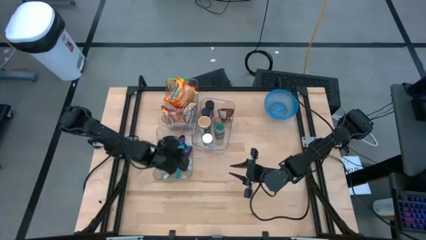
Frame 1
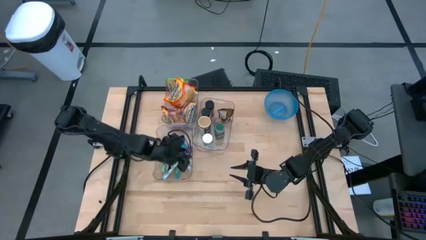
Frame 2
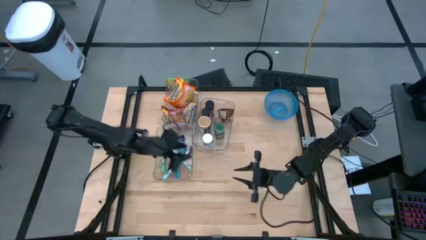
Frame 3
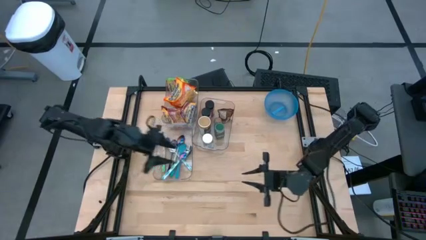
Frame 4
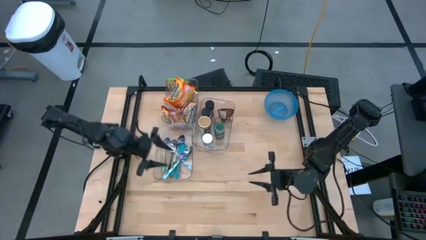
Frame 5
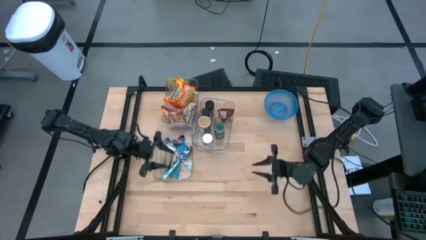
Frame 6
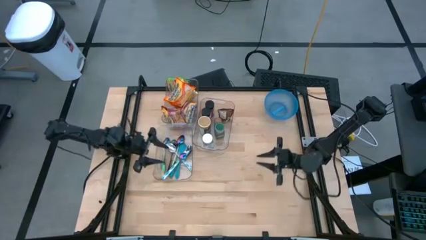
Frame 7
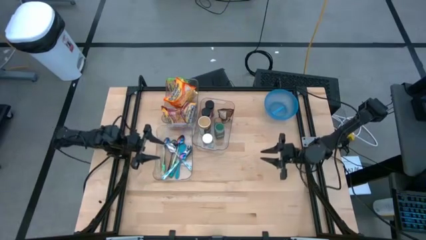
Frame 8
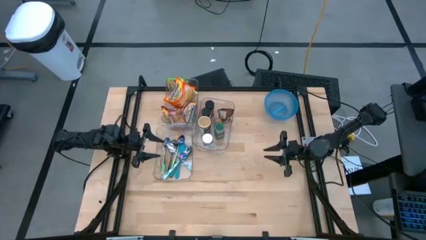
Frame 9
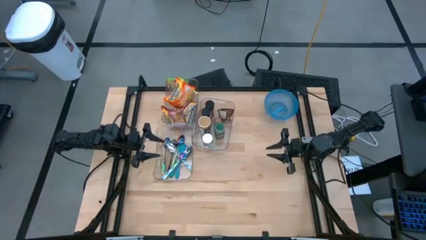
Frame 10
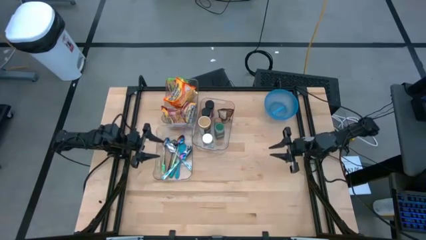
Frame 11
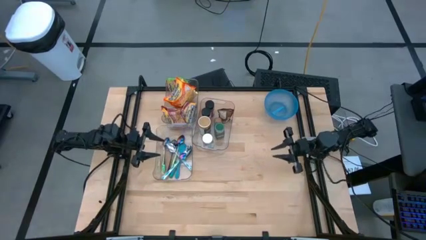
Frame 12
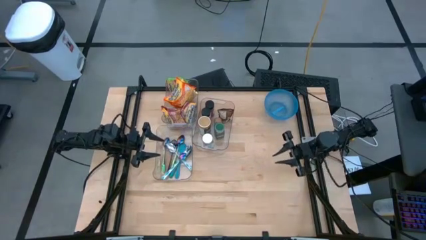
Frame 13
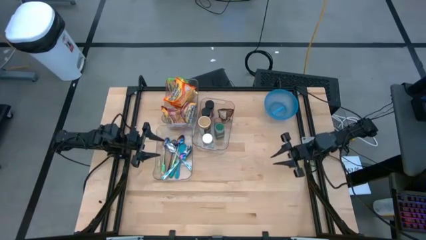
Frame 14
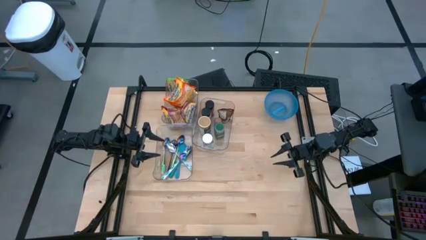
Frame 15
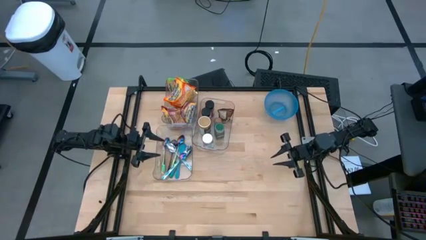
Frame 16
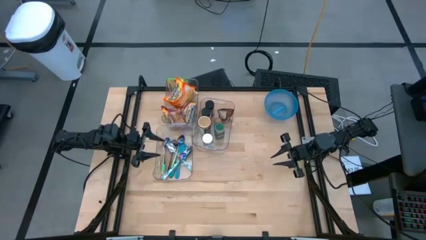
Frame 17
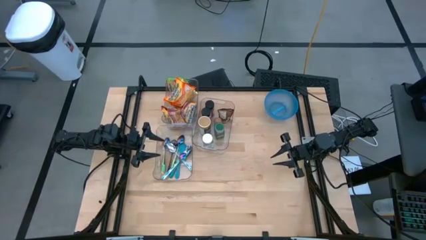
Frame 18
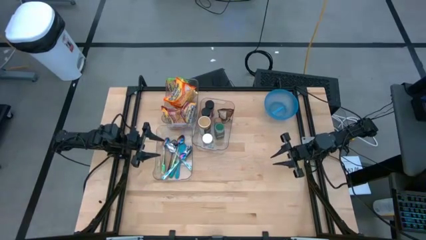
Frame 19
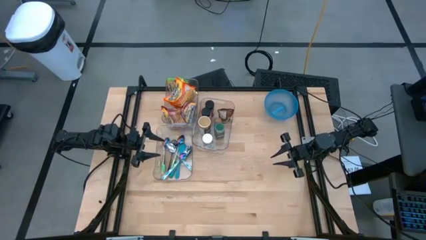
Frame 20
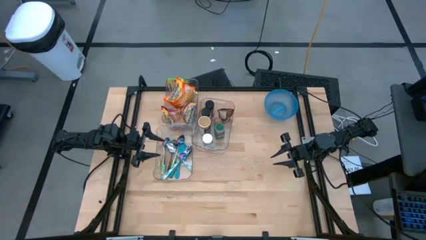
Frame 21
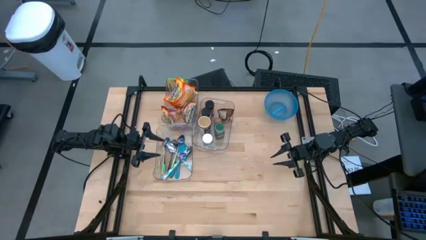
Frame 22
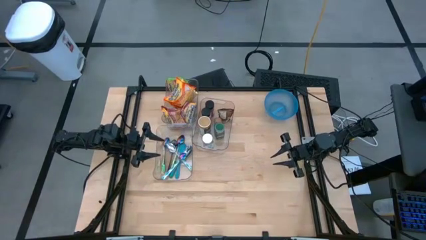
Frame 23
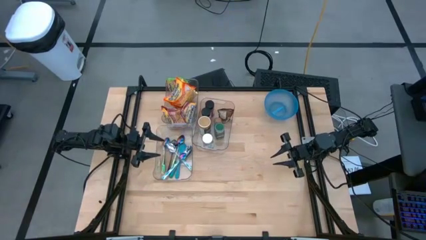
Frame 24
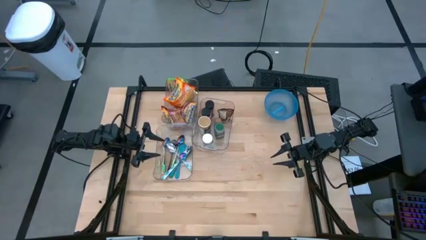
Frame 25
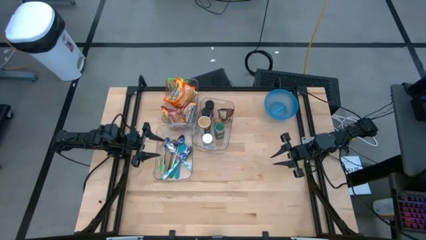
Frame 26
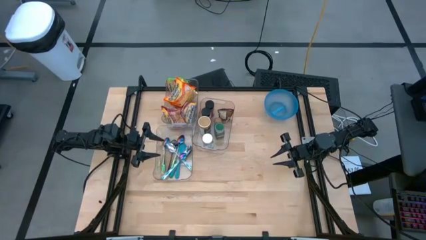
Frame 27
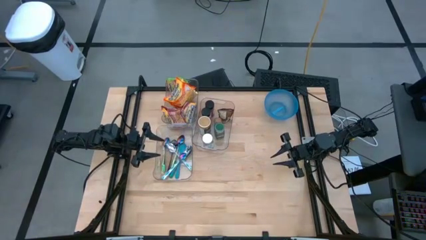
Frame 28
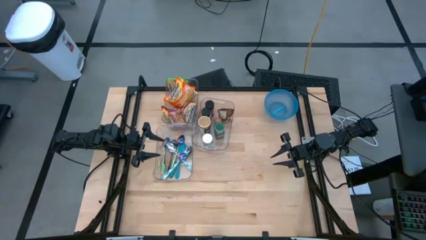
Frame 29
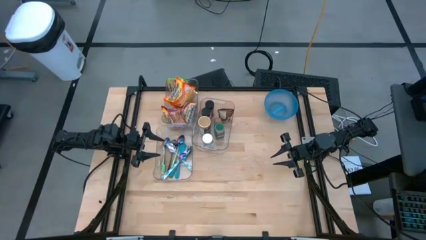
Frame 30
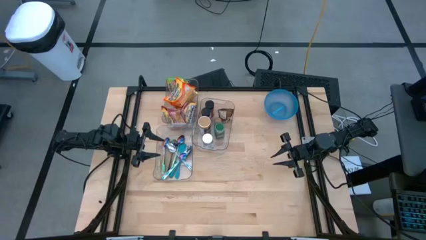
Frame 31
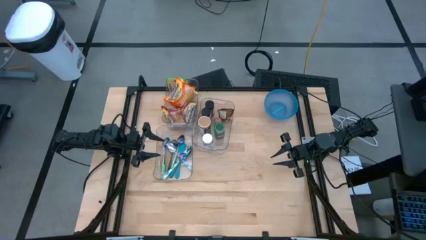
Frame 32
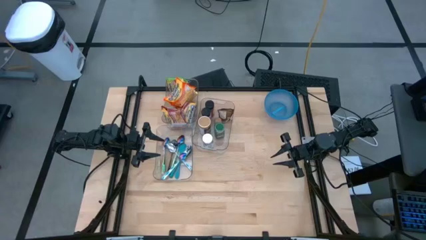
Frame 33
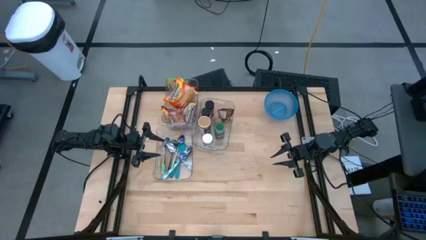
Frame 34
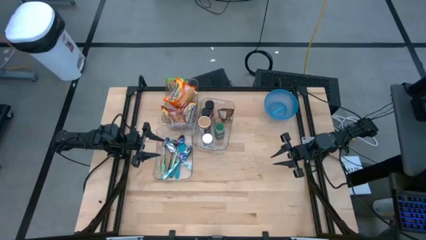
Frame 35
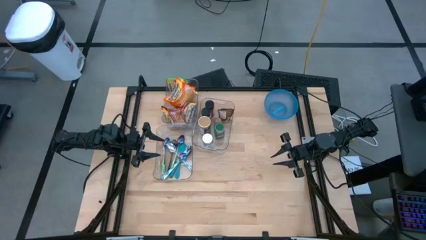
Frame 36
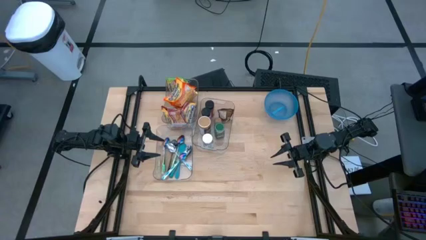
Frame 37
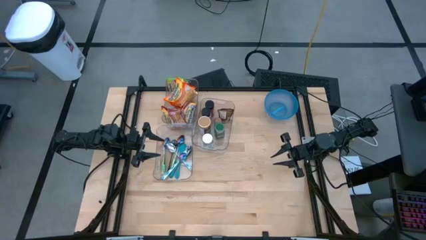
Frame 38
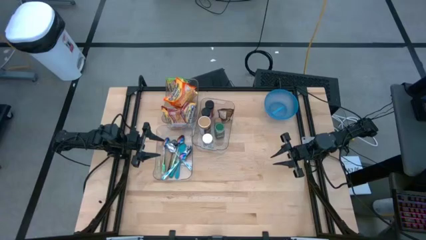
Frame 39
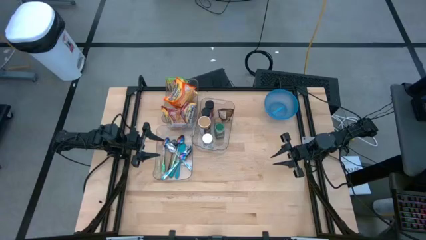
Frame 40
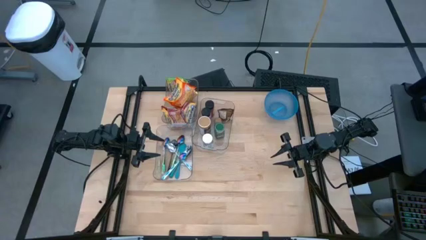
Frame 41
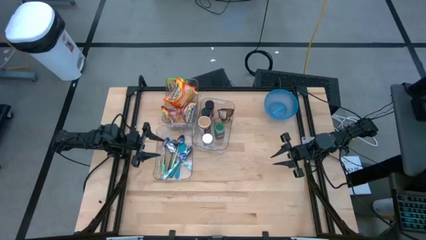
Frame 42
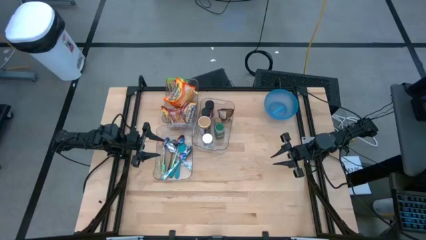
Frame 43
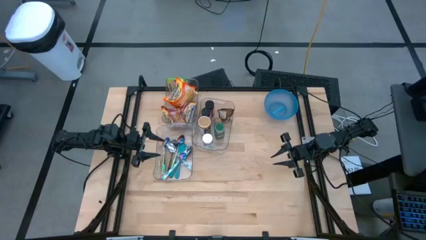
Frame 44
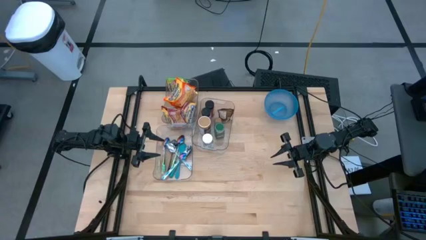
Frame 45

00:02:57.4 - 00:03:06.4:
Task: Pick & Place Food Item
Return to Home Position

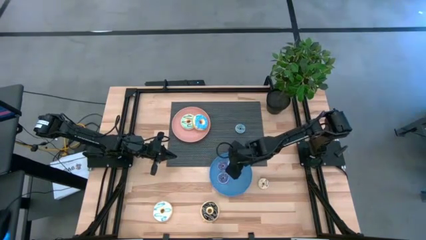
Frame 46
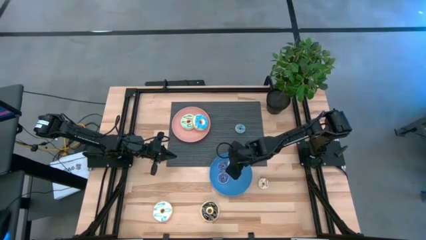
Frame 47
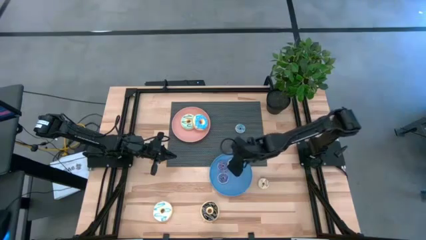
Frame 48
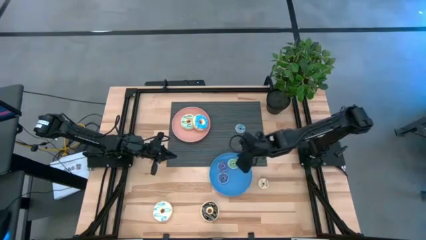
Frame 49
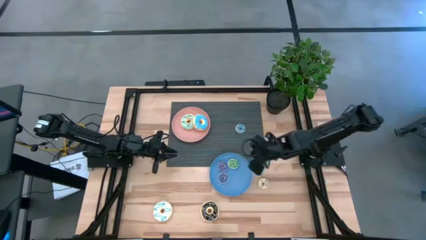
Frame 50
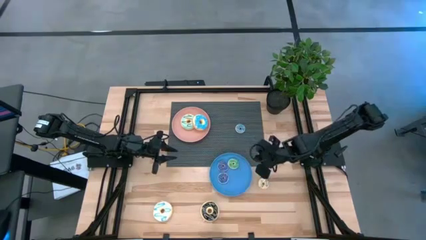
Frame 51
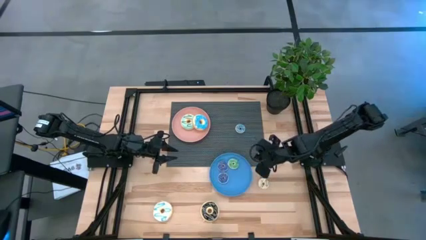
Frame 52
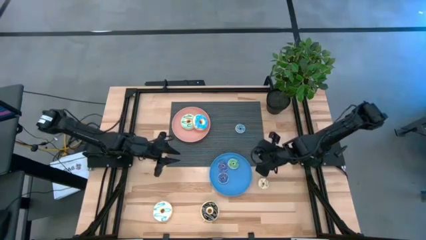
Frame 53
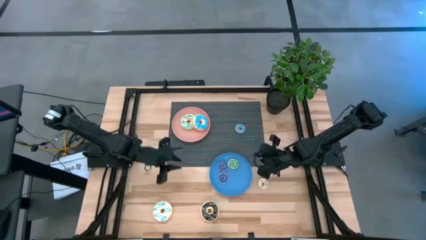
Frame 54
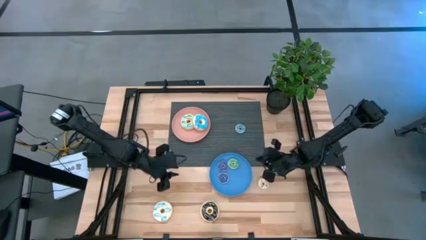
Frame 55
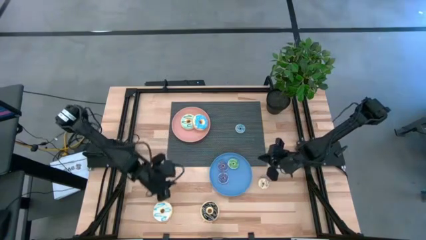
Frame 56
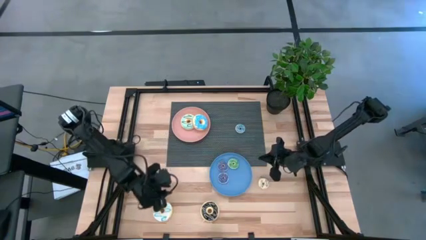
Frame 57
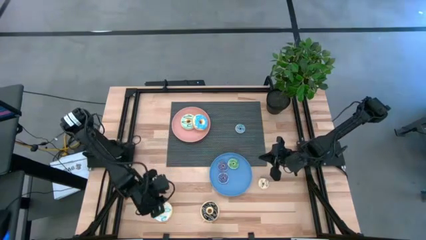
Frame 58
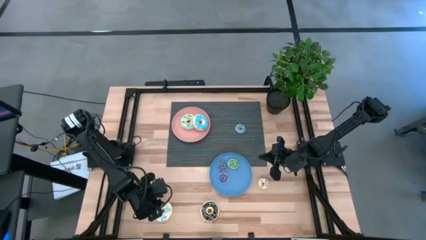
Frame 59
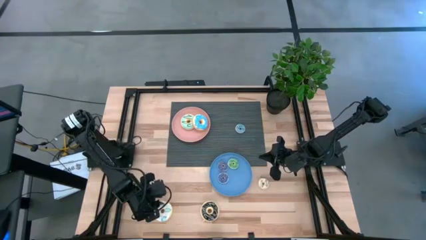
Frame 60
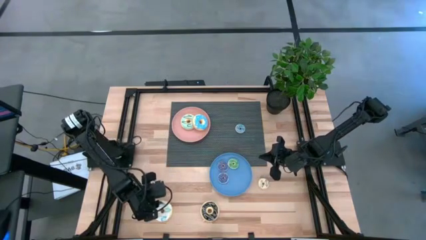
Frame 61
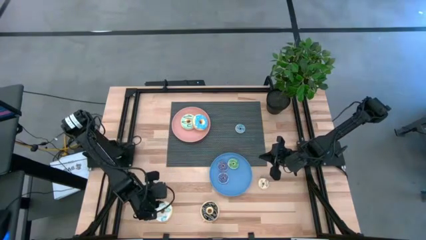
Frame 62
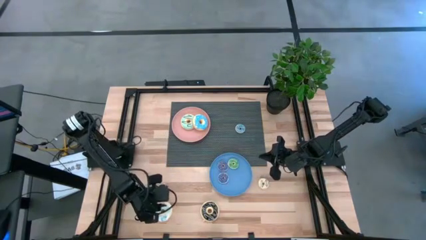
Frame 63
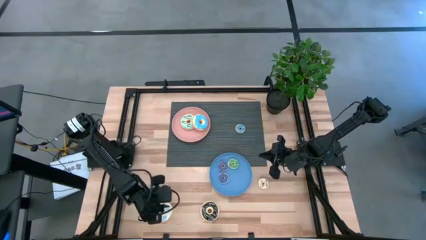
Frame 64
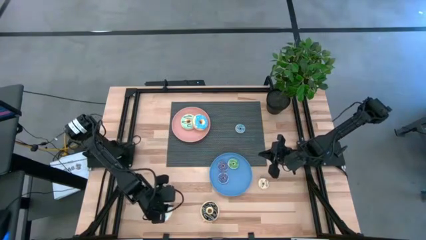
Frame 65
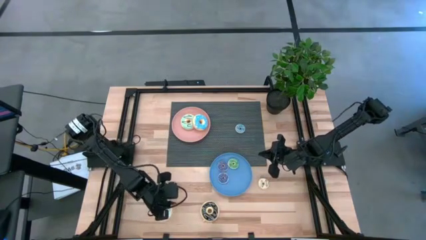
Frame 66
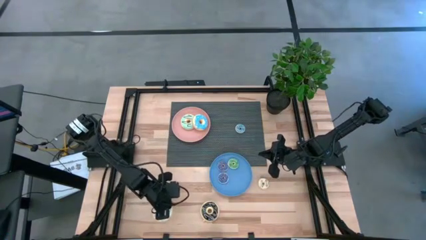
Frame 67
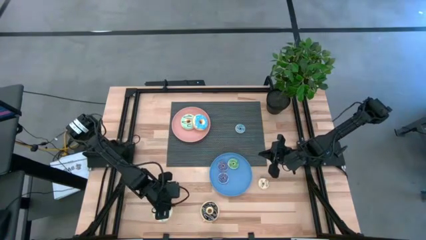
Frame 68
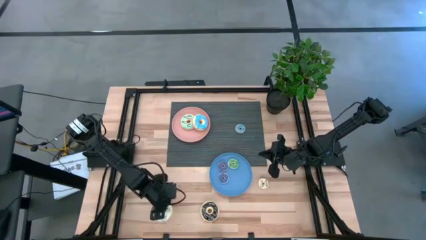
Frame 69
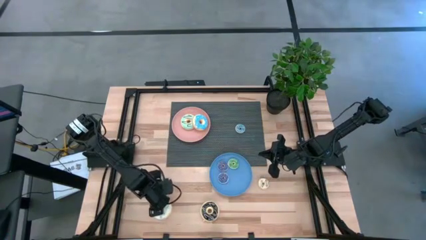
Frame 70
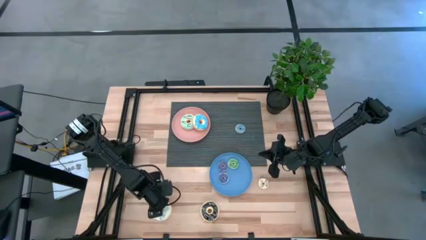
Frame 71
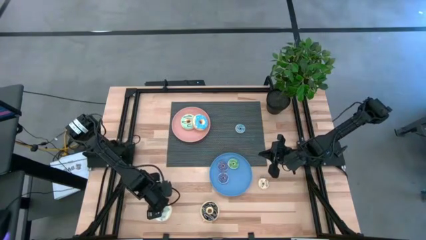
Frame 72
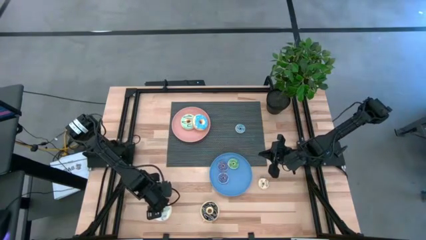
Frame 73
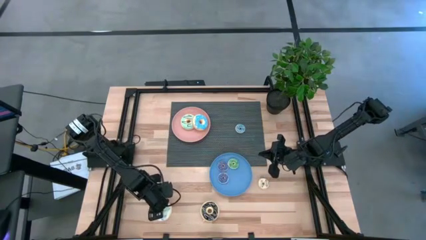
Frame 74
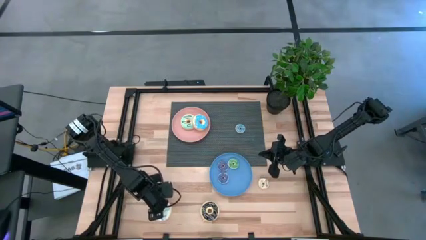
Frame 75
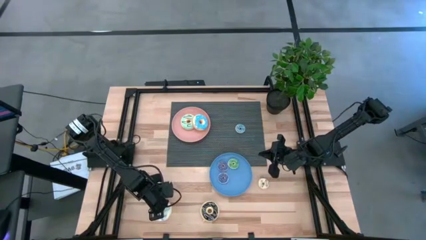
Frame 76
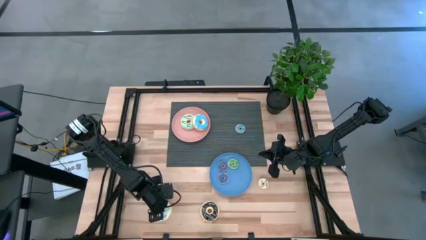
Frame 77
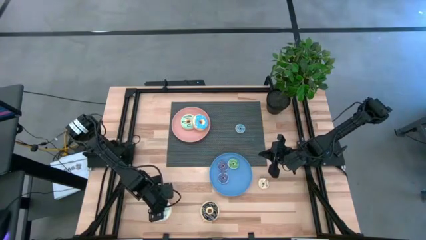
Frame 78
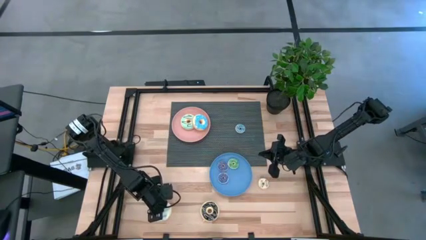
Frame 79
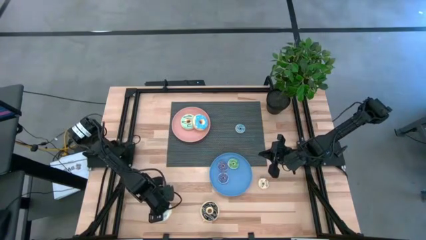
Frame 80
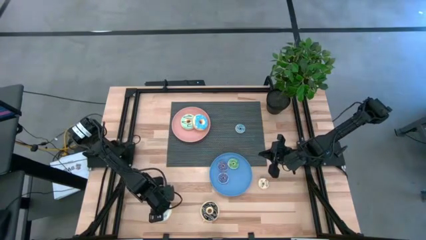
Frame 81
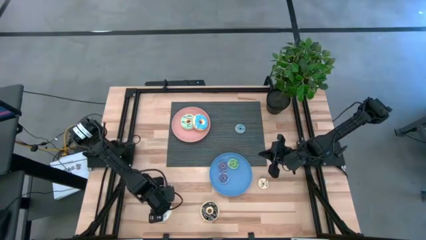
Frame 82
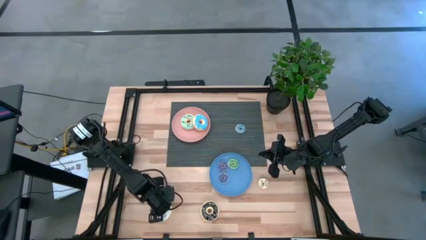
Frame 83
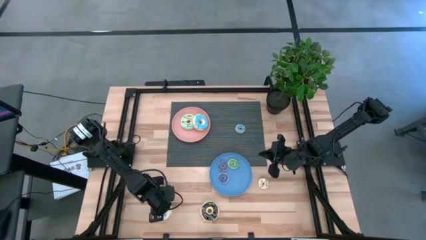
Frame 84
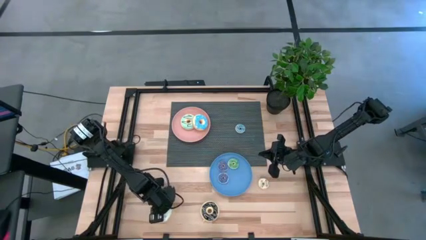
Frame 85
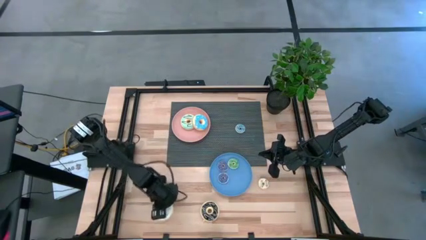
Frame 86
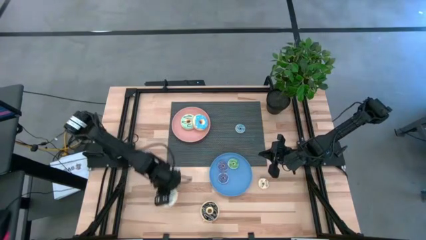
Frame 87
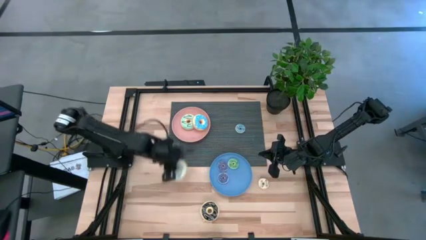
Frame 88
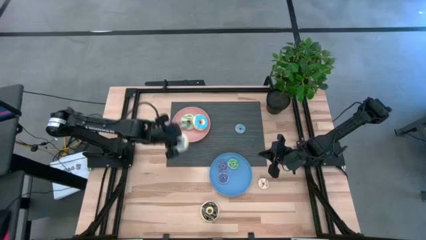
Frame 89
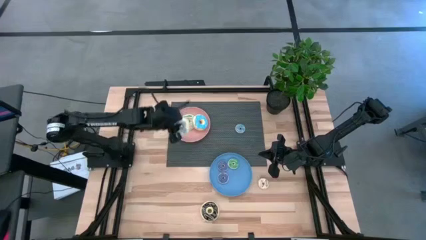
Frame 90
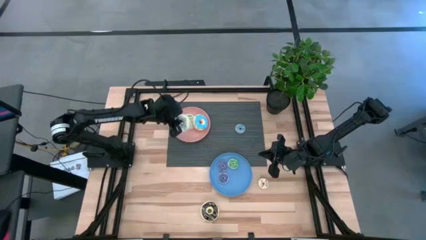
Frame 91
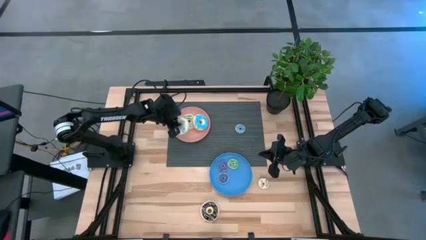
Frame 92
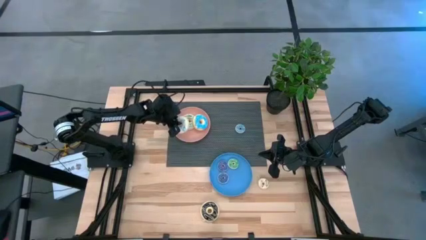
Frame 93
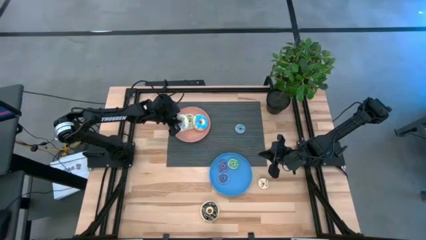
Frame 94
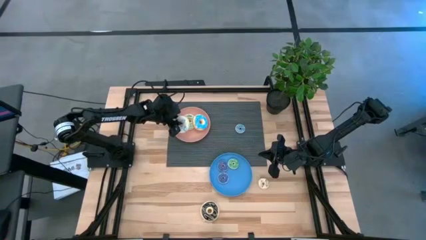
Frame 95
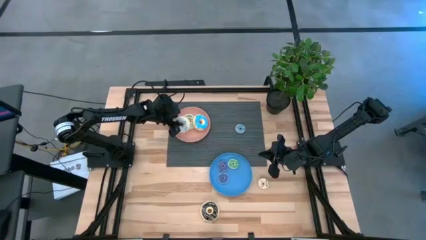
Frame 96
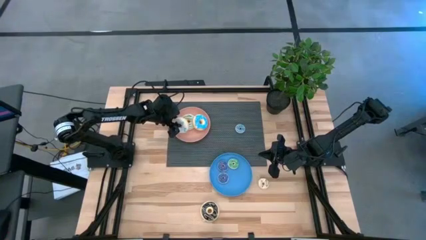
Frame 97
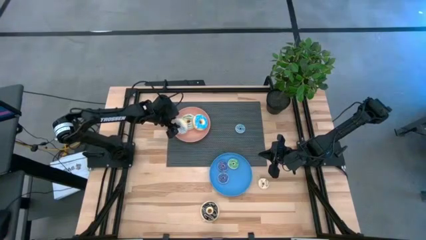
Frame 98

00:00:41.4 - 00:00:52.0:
Task: Pick & Place donuts
Put the large white donut into the pink plate
